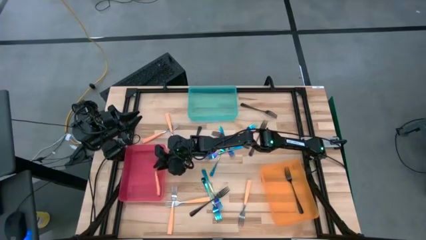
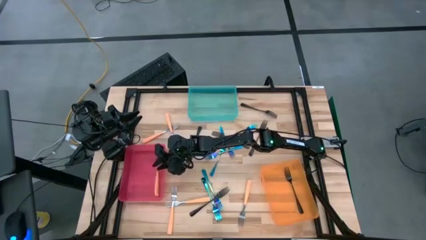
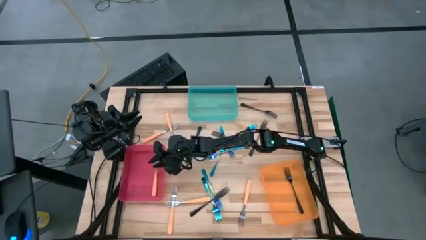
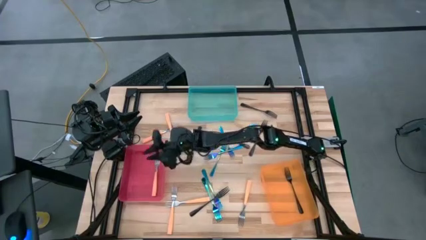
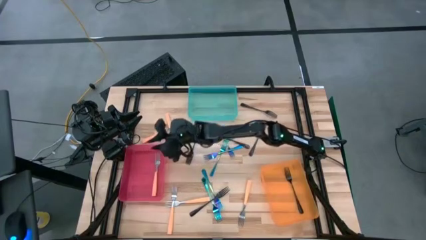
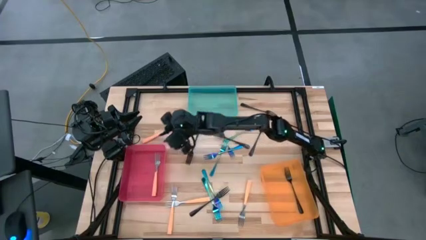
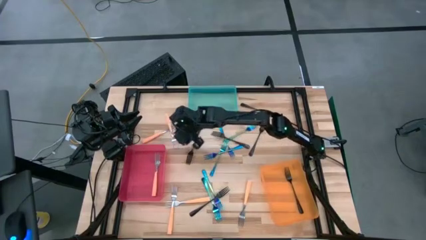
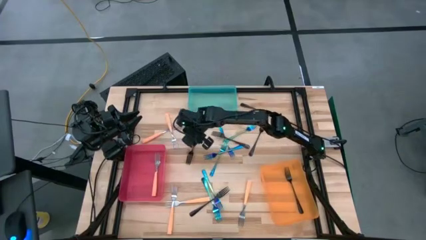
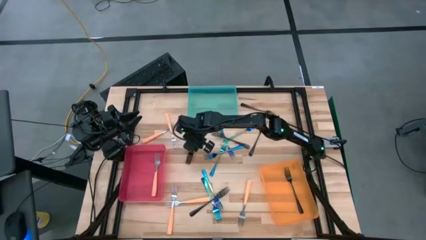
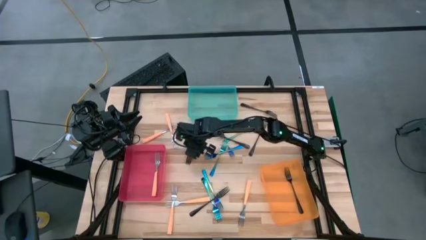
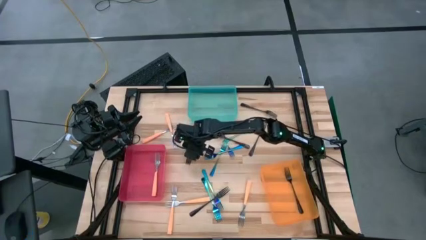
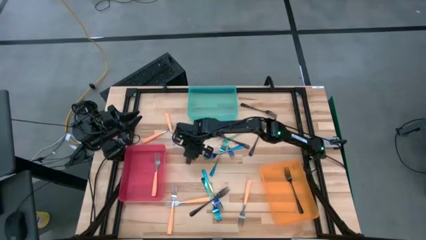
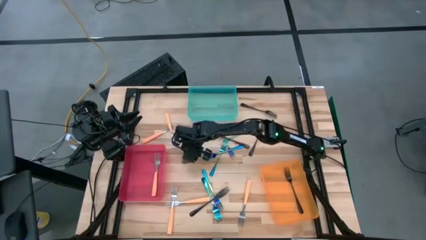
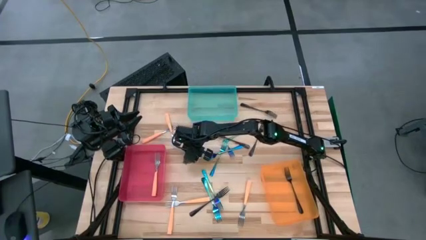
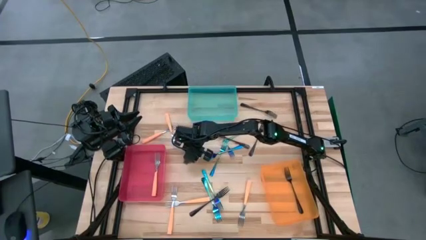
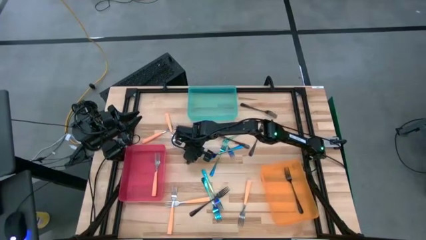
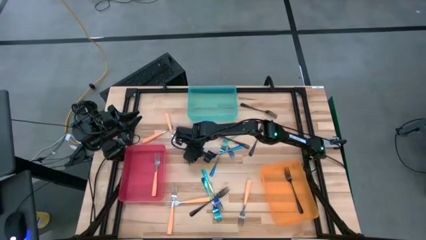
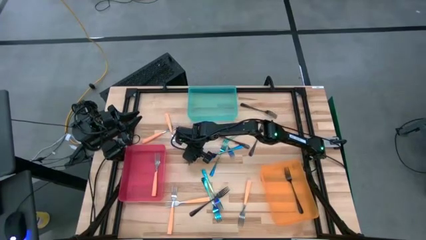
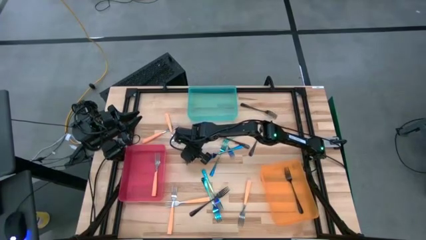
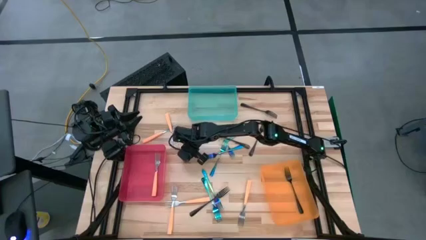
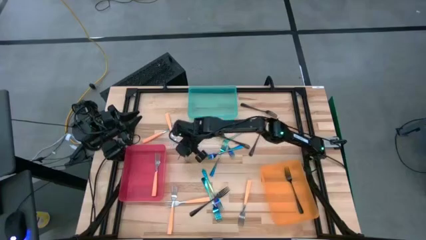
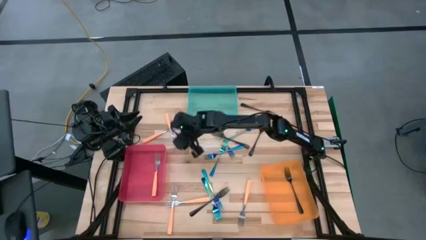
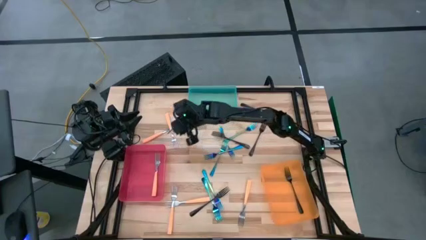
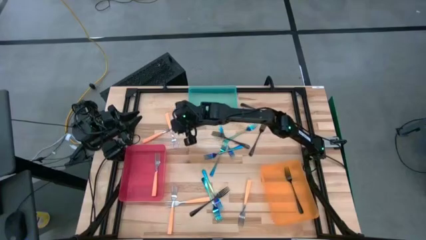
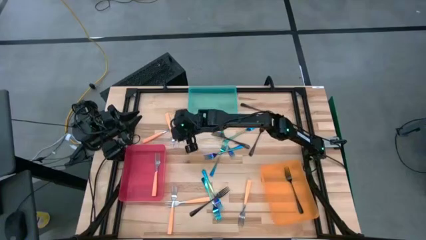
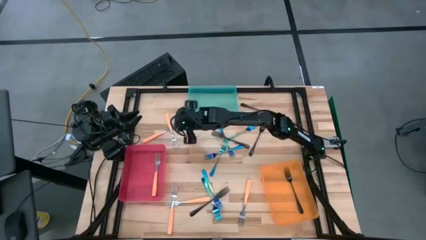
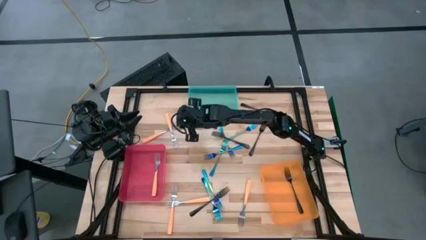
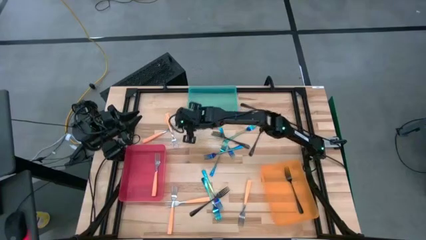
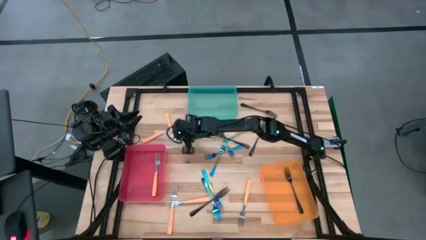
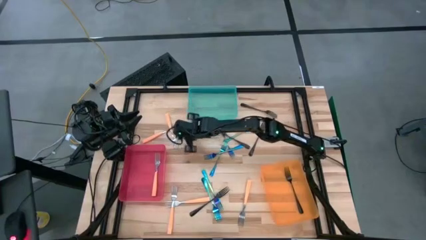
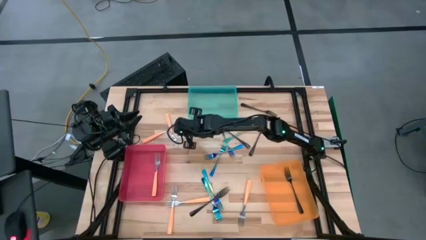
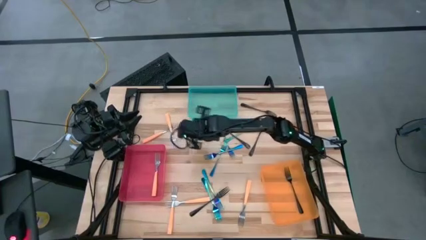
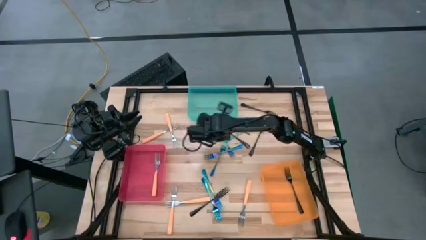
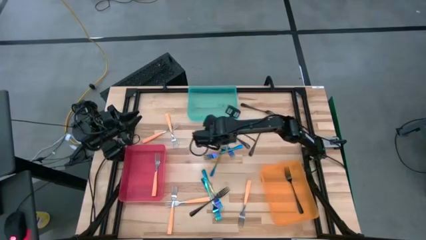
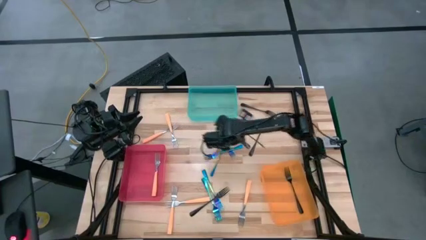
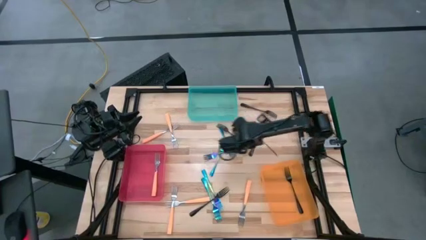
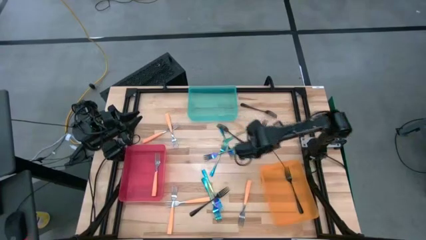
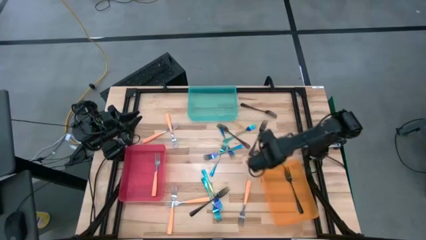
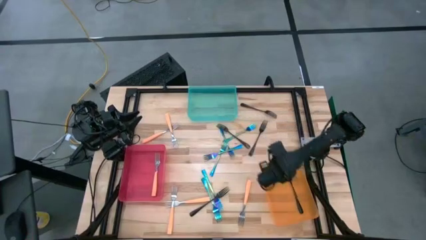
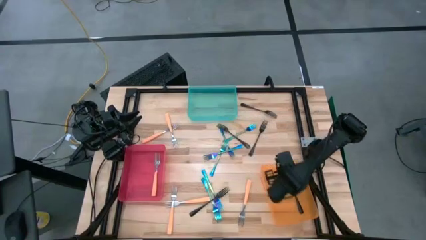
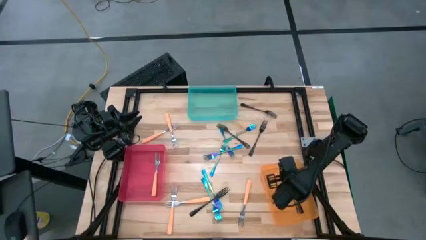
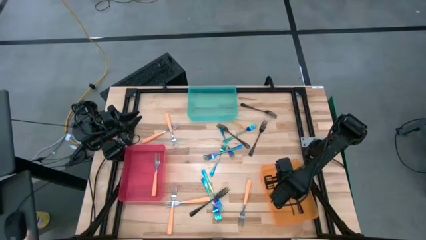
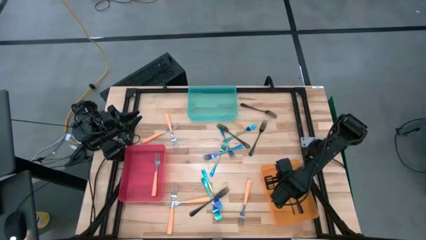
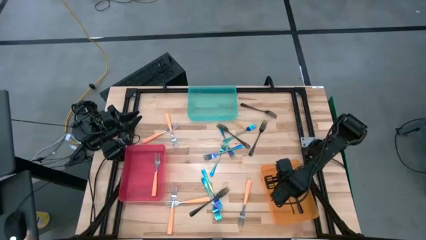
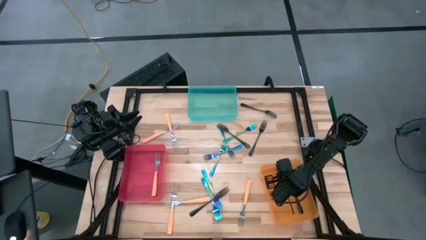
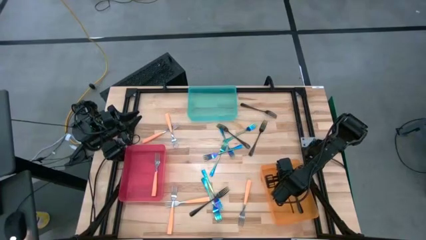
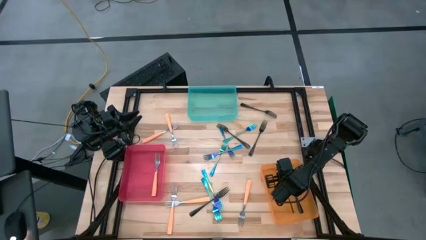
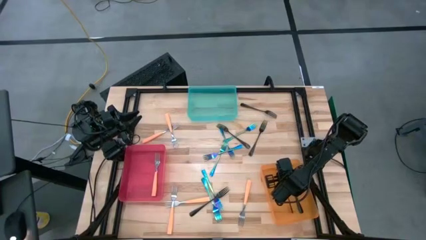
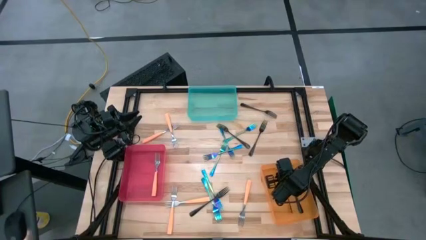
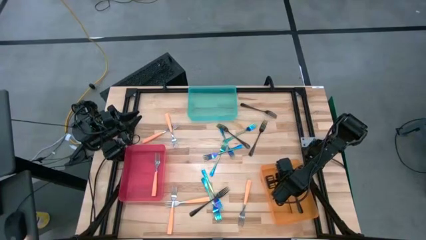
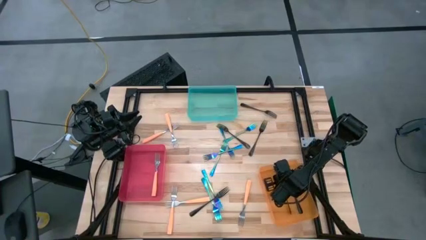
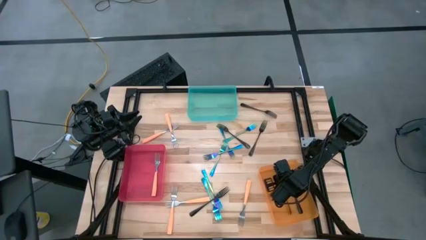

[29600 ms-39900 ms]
Task: Sort silverware by color (type)
Put the black fork into the orange bin

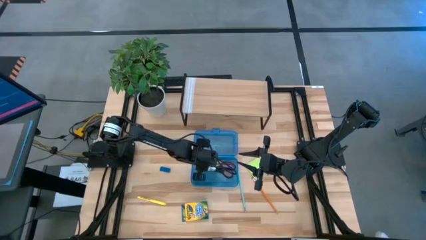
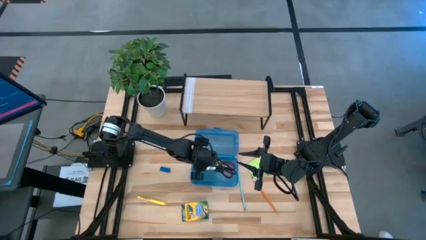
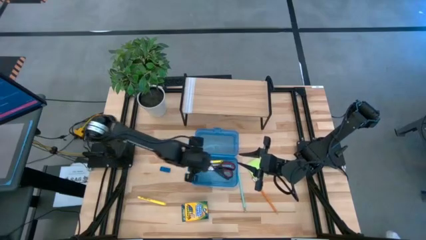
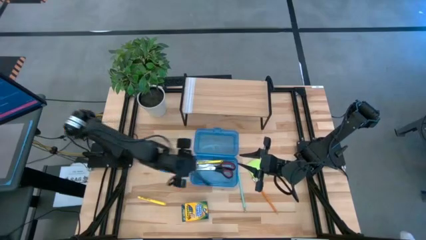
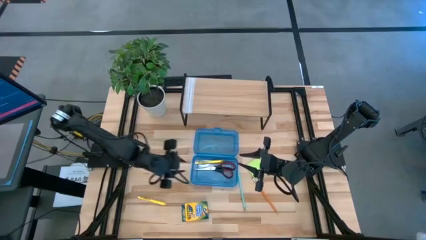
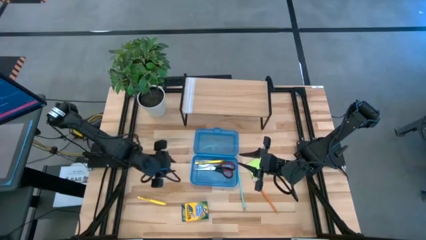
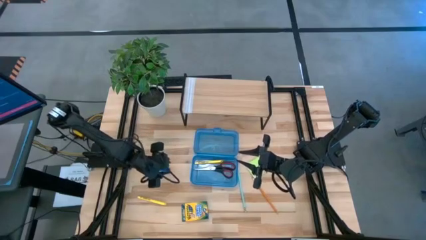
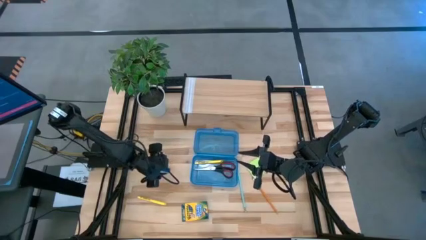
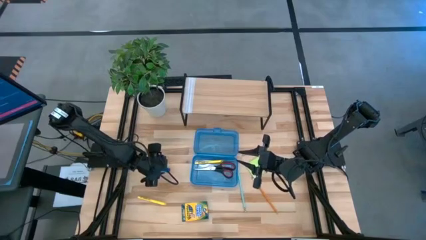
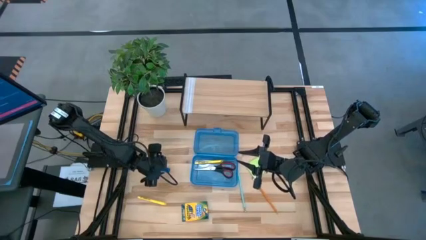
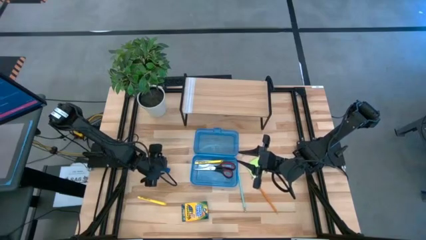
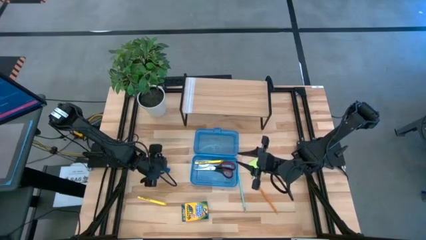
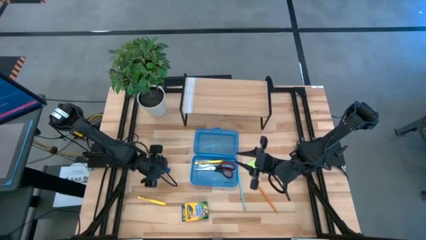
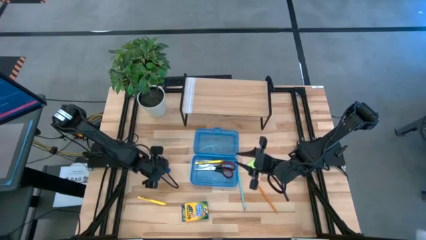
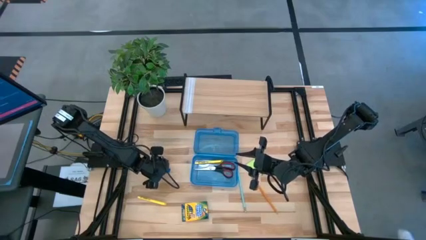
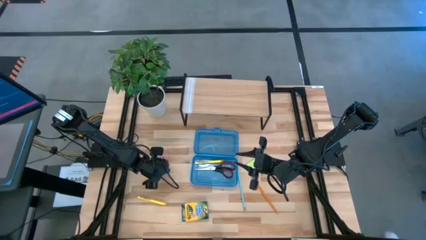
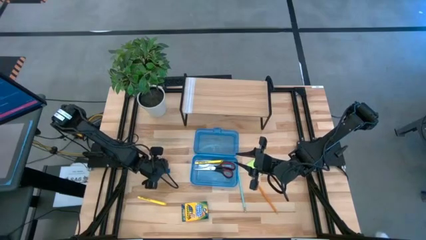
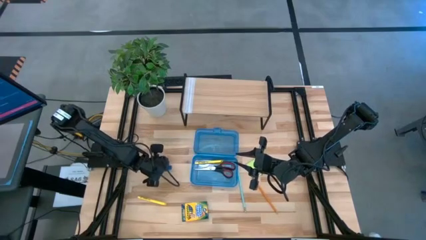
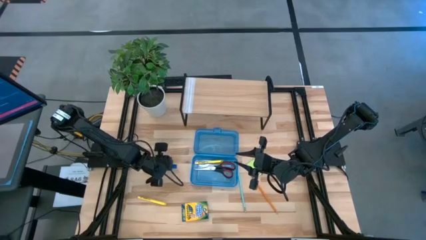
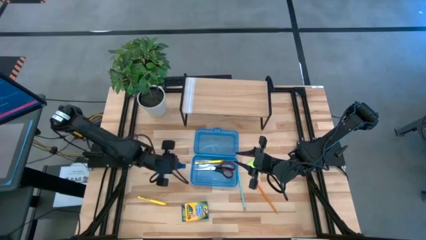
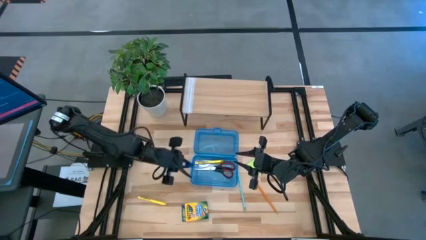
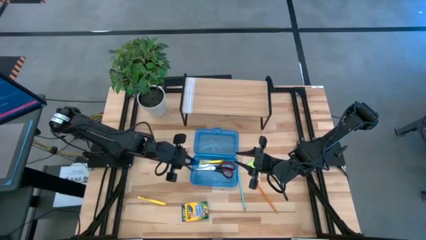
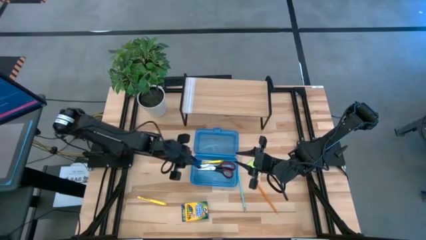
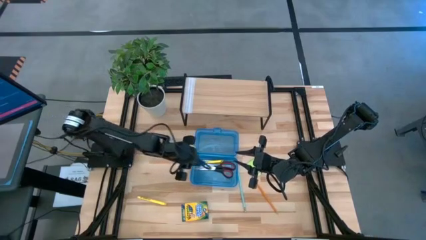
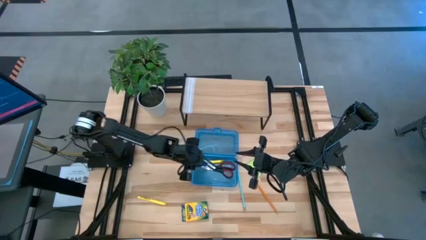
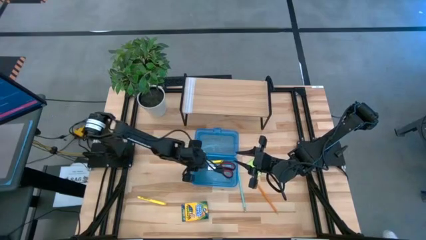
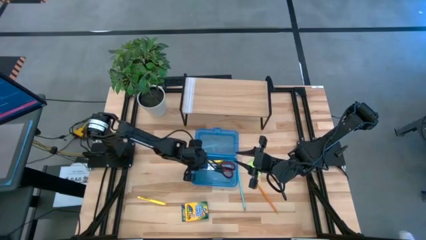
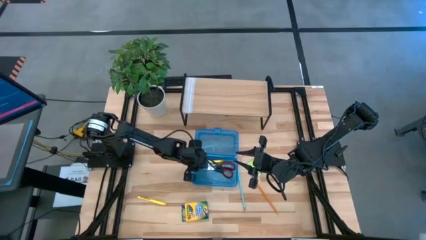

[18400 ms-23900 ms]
Task: Pack school essentials
Put the blue eraser into the blue supply box
